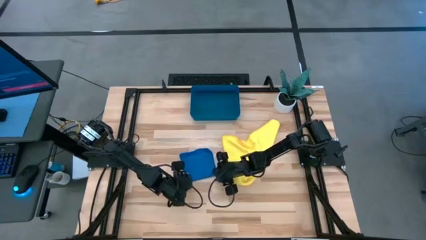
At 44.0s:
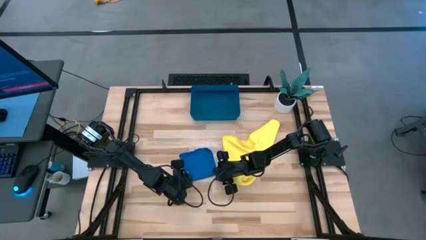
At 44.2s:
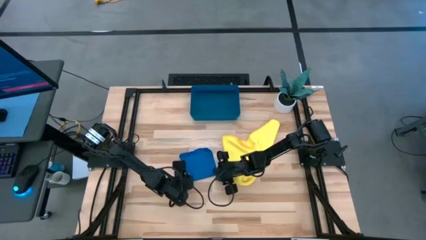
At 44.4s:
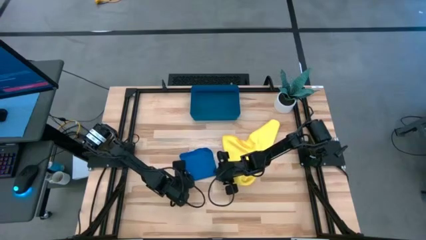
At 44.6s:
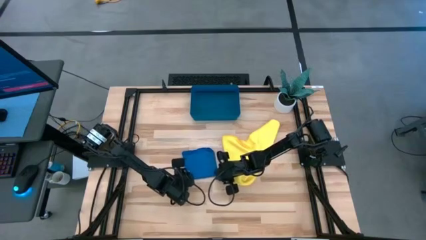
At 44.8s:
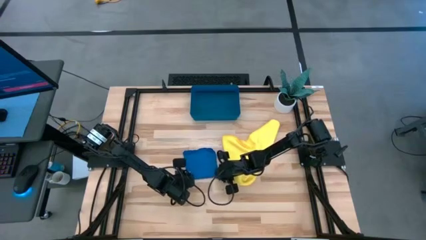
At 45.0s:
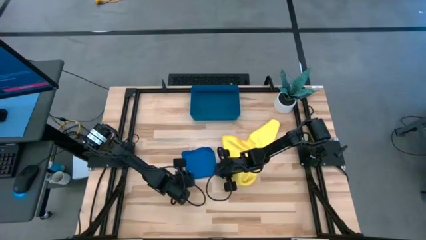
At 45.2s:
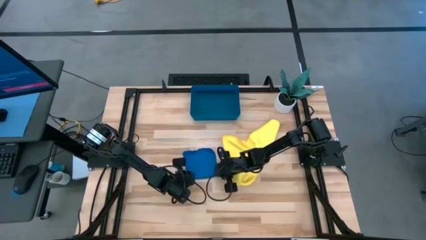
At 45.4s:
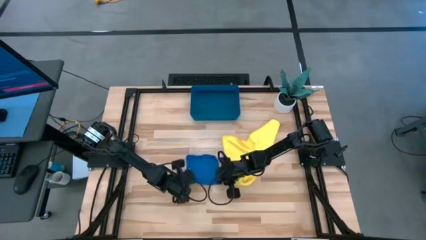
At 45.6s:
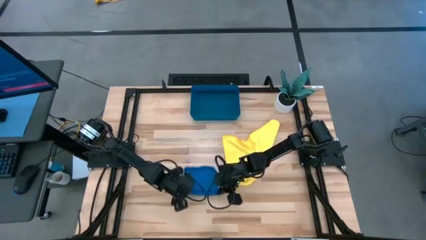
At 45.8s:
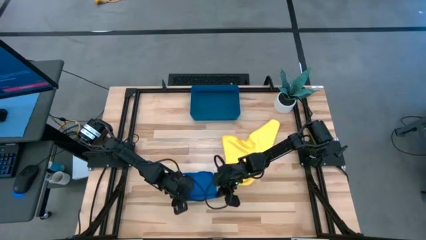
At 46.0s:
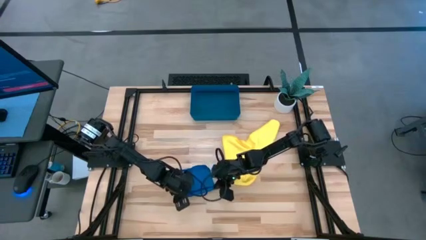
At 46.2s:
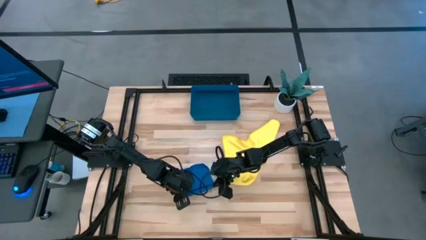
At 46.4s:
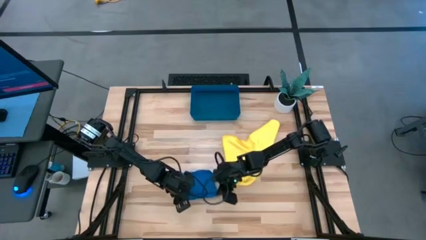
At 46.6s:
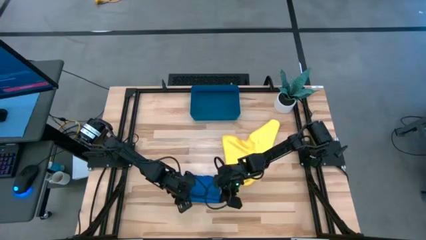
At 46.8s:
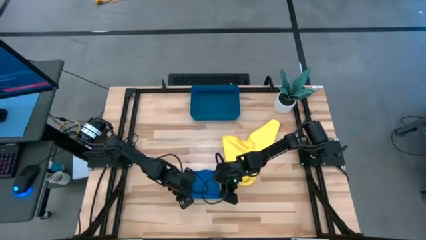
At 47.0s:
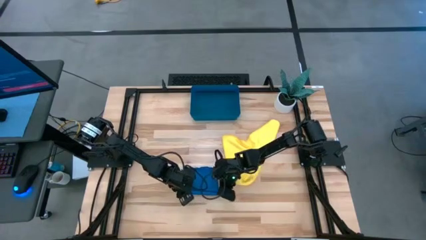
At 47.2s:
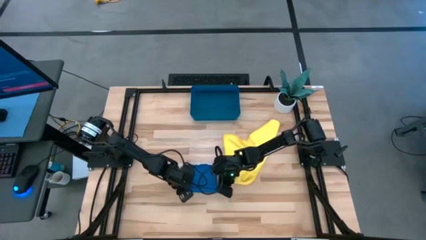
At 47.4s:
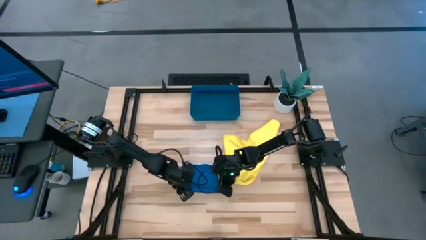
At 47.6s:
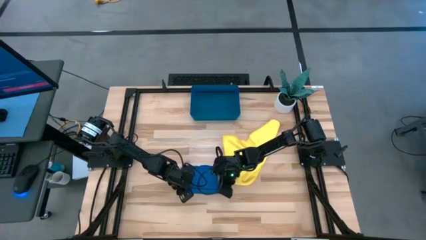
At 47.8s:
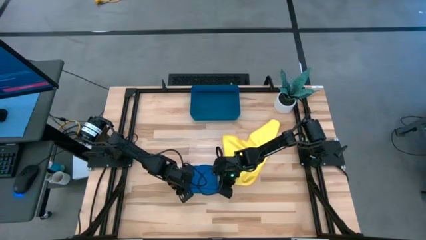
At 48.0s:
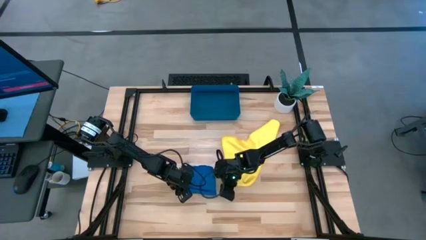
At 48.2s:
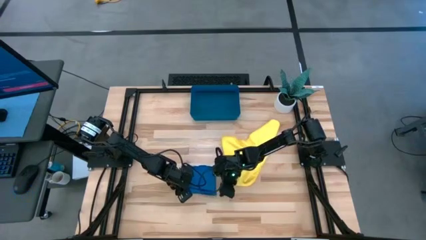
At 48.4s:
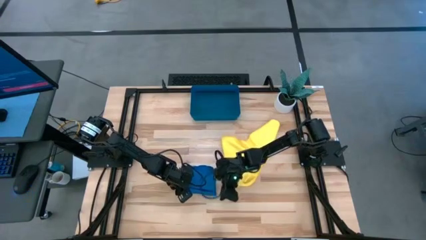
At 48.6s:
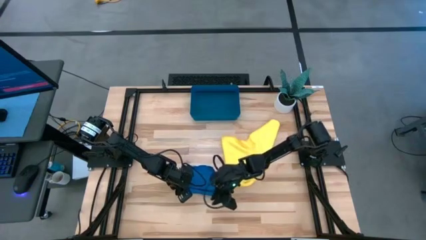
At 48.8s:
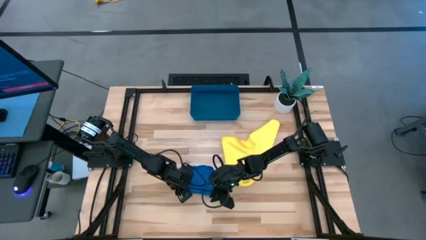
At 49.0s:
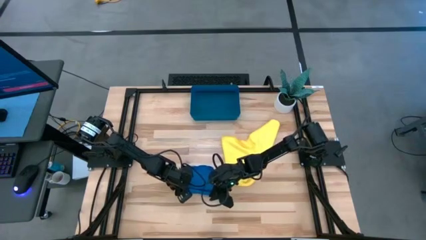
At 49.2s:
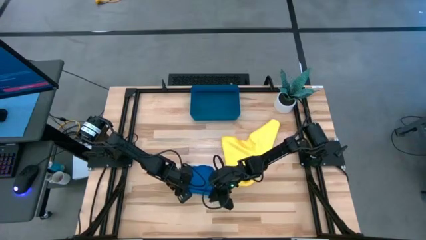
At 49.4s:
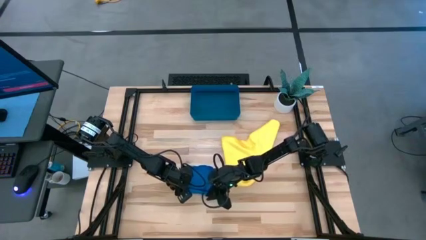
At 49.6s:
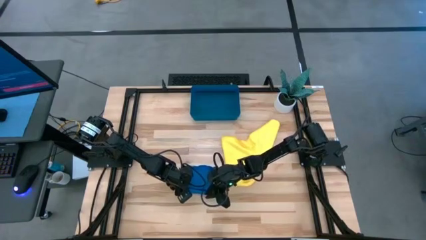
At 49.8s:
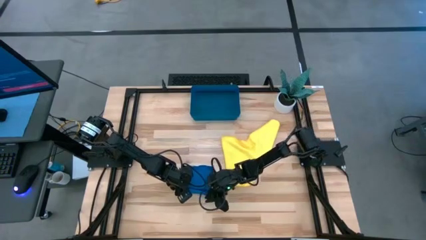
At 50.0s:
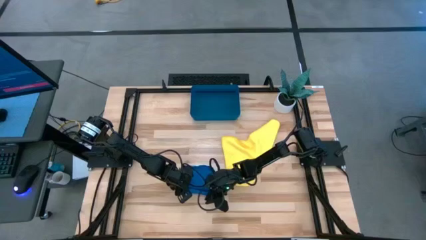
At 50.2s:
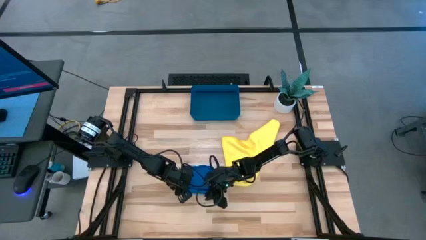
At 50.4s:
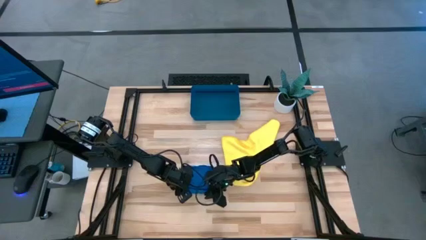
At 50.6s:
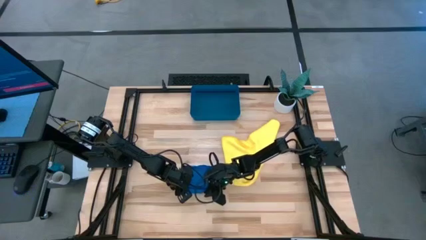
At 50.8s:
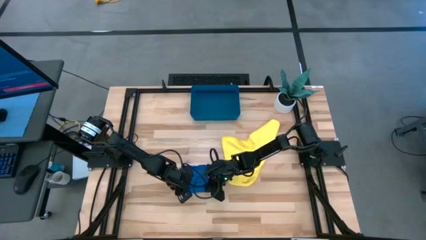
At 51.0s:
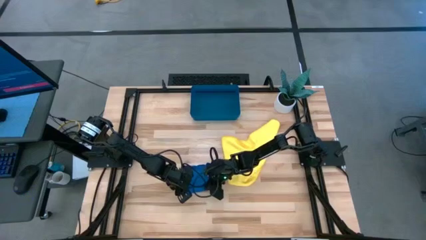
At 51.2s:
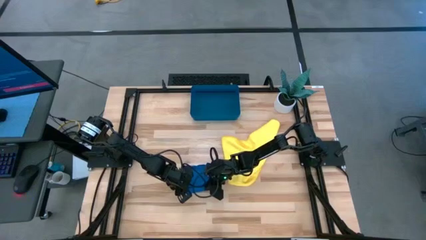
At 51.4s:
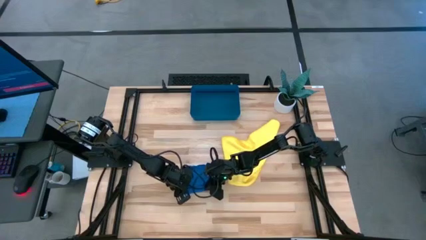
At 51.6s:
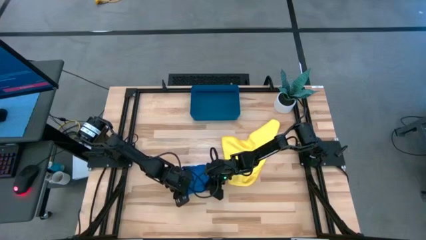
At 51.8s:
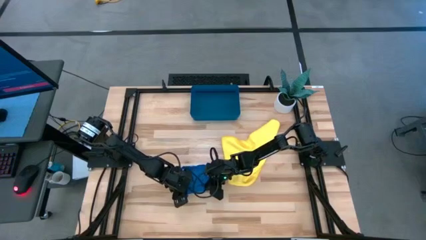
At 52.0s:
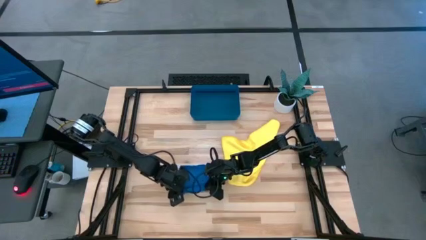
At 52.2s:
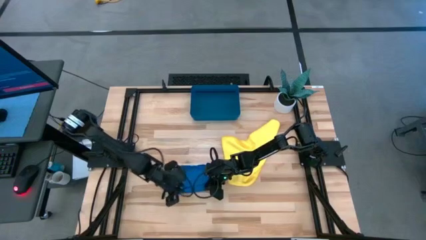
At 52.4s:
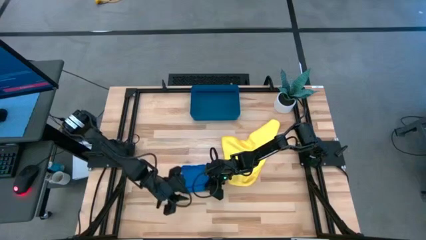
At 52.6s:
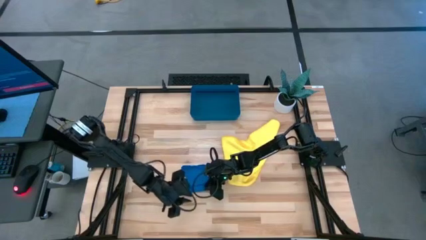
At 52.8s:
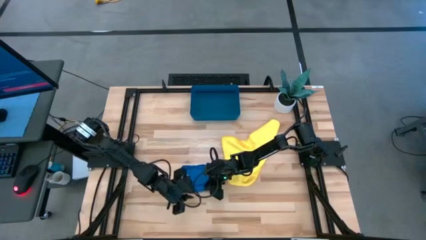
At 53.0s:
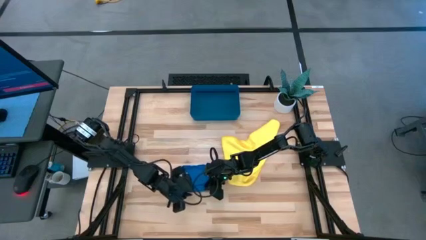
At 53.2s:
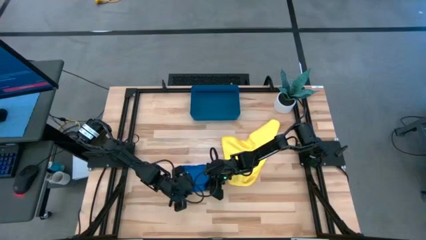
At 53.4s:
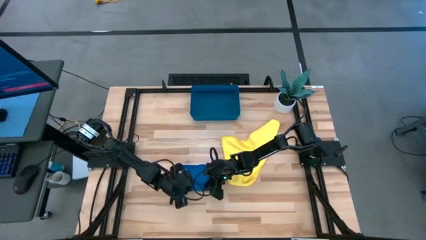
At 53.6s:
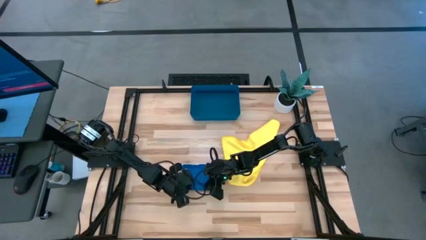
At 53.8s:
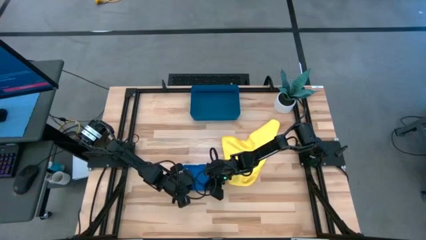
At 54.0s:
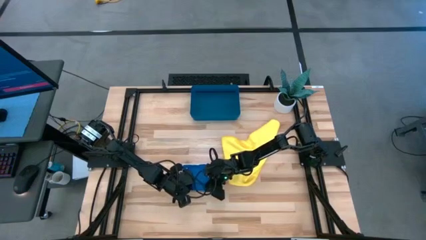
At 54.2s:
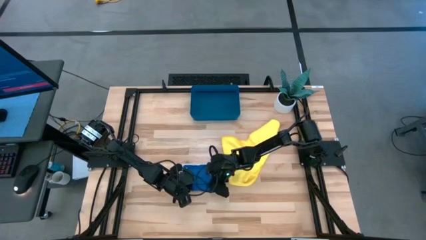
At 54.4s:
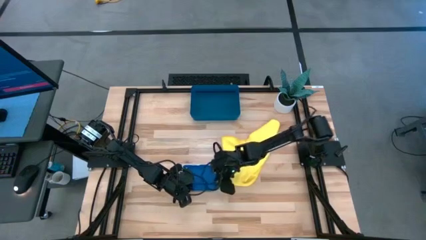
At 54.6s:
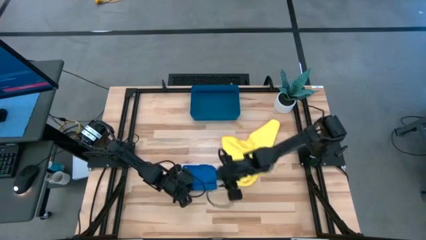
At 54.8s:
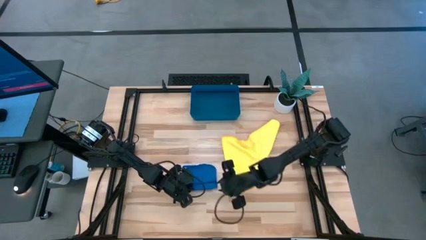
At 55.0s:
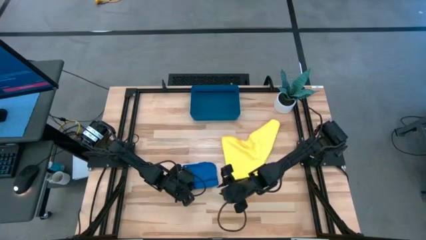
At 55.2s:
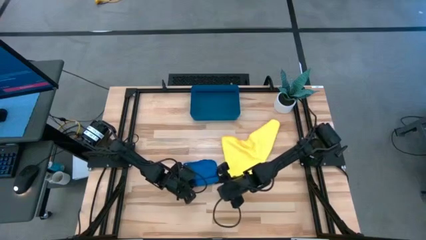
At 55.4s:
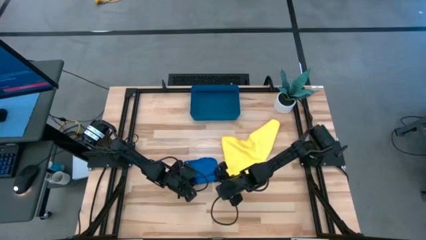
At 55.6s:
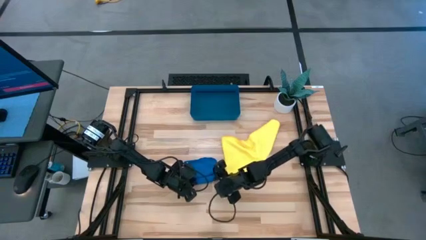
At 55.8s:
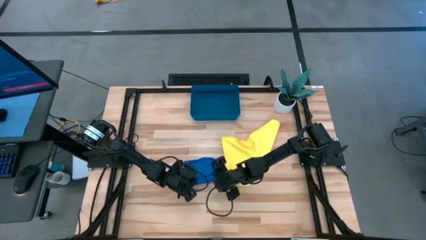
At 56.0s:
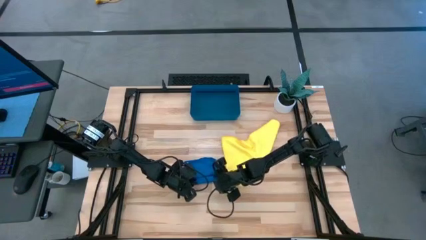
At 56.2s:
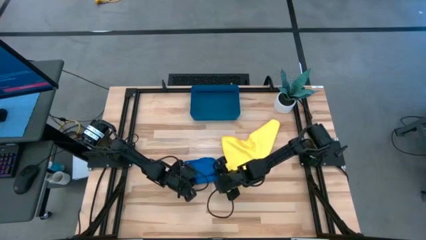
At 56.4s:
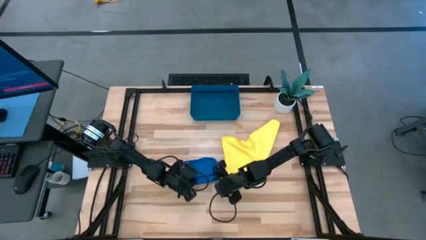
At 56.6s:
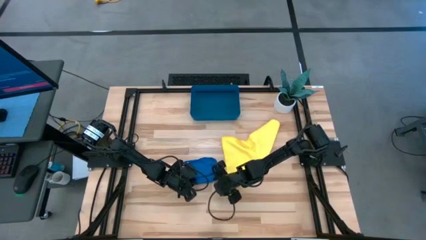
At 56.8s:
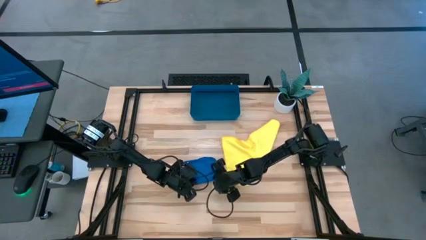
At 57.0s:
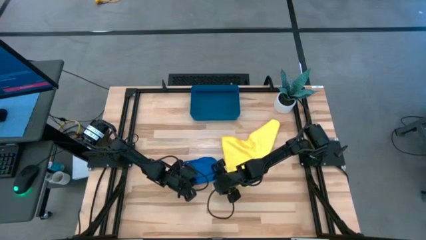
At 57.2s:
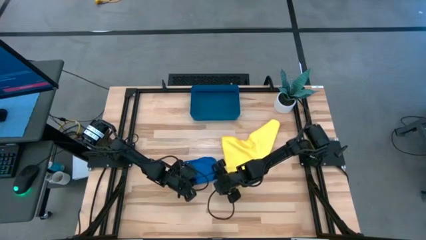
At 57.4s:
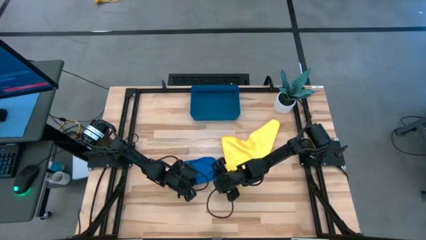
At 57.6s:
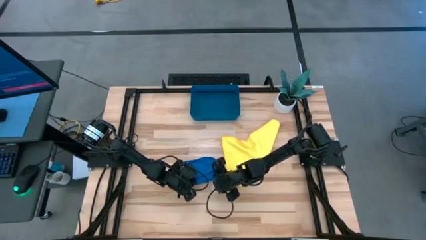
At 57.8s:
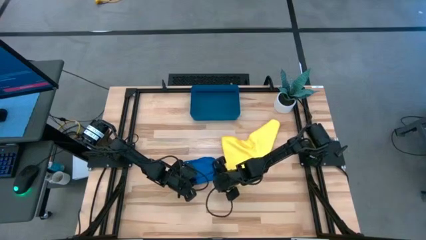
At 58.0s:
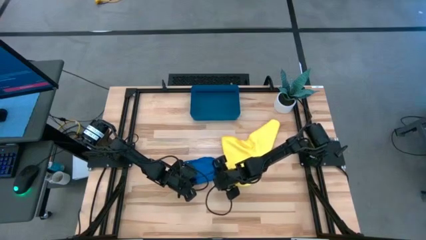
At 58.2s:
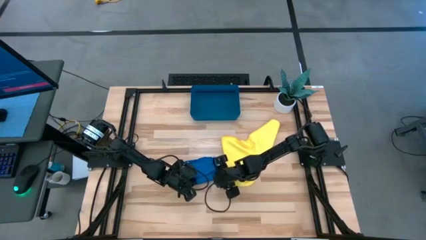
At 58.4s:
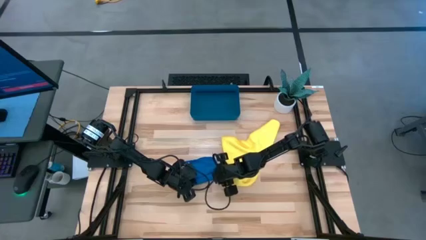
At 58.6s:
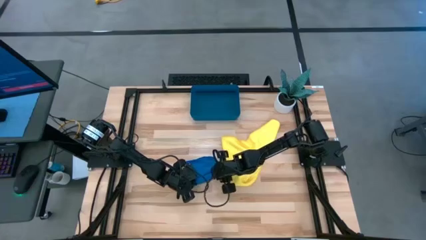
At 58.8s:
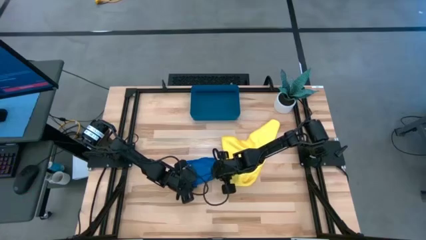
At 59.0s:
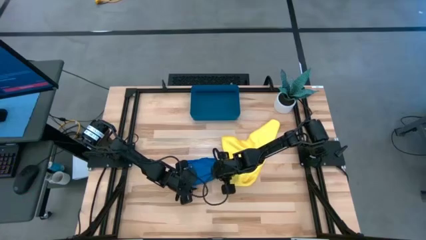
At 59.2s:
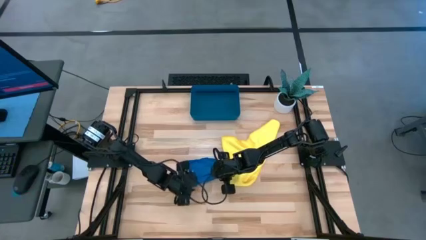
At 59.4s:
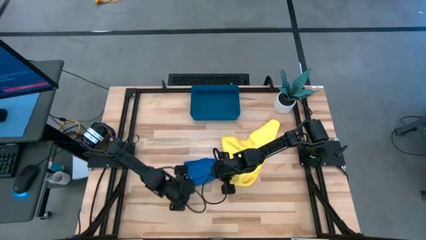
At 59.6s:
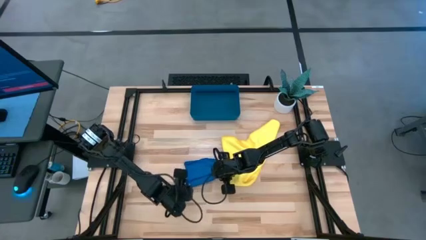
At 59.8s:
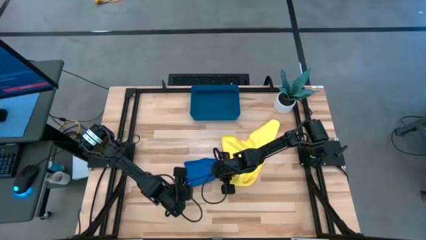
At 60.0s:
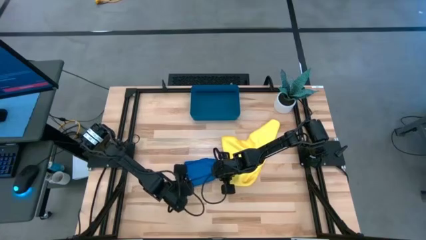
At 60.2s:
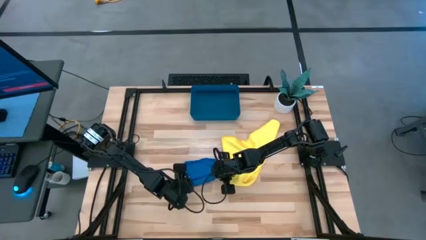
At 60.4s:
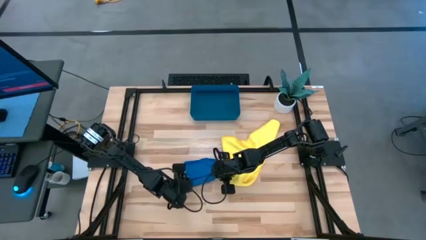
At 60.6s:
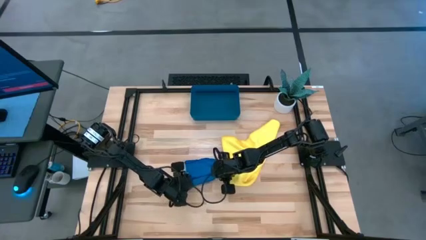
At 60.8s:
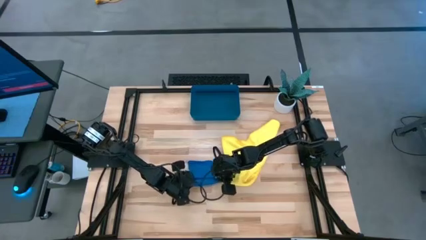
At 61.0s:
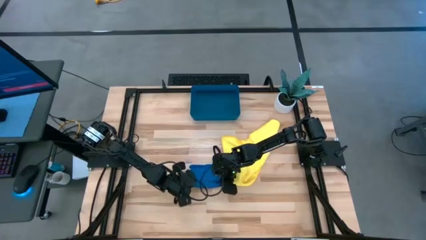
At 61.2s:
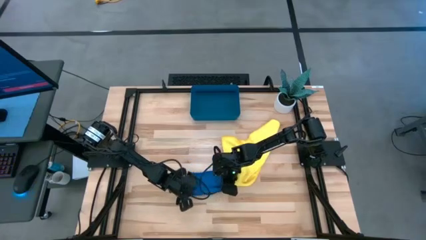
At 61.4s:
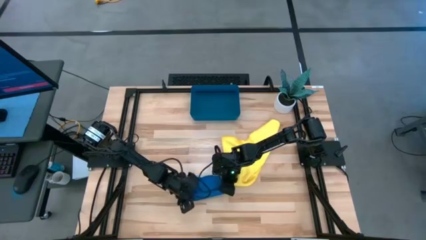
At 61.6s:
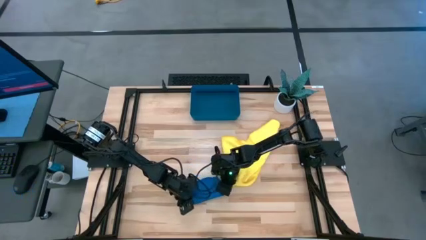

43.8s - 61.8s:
Task: Roll microfiber towels into tight, uniform cylinder then place into a basket
Roll the blue towel
